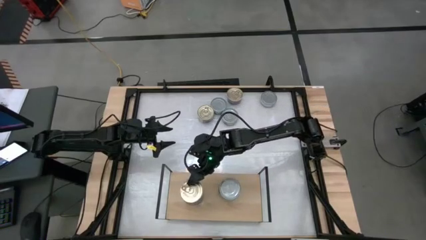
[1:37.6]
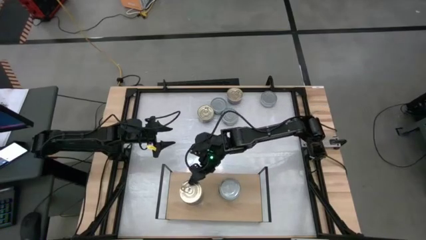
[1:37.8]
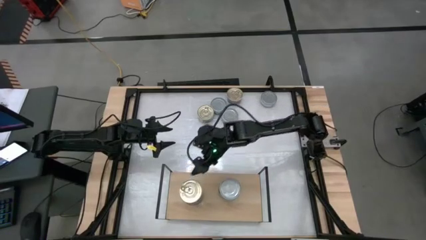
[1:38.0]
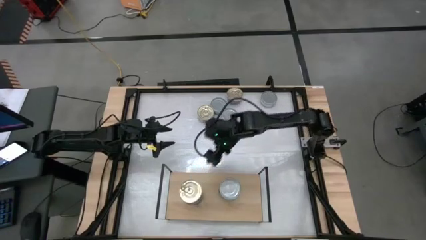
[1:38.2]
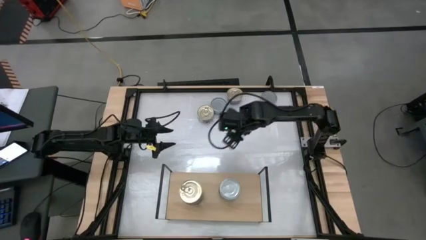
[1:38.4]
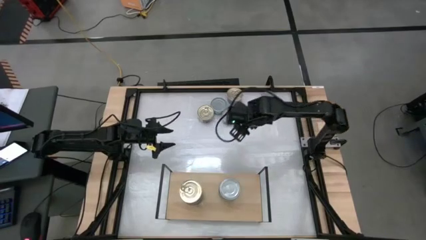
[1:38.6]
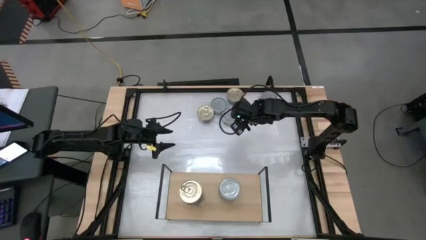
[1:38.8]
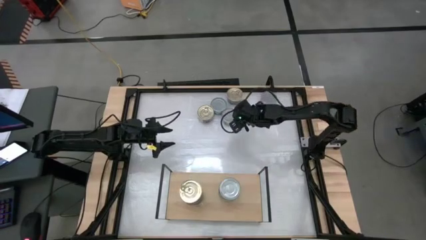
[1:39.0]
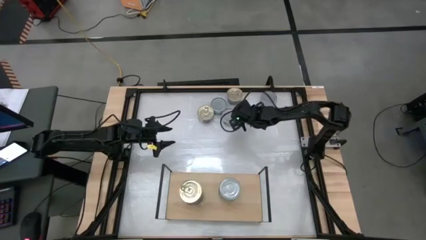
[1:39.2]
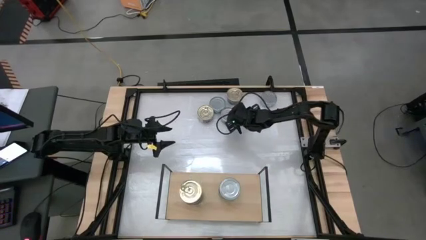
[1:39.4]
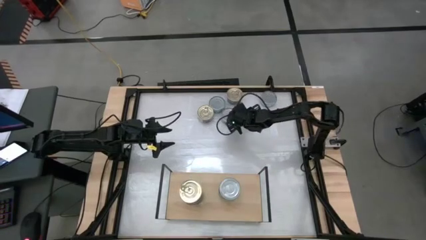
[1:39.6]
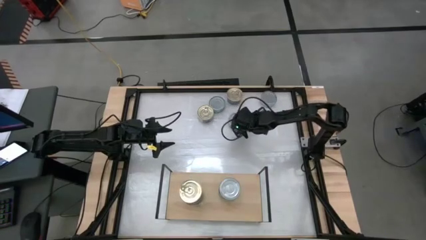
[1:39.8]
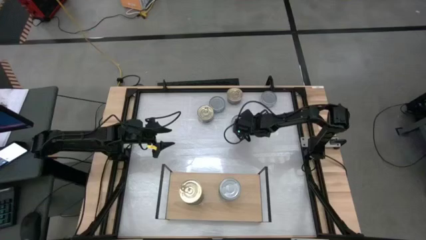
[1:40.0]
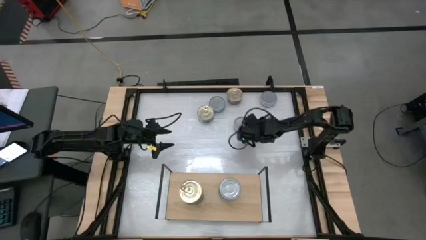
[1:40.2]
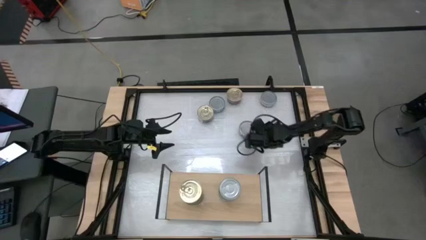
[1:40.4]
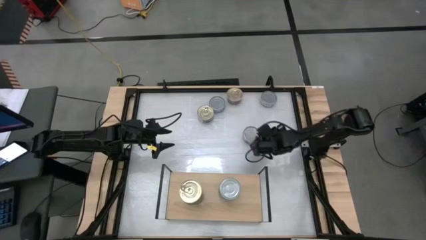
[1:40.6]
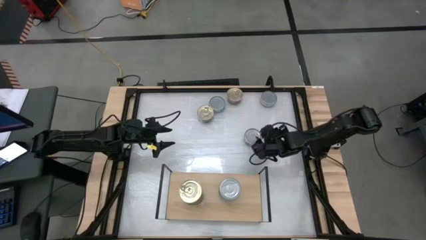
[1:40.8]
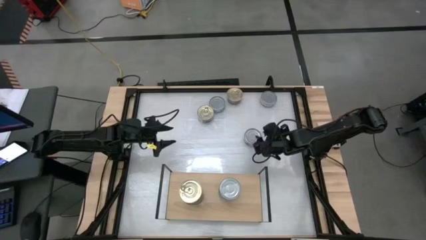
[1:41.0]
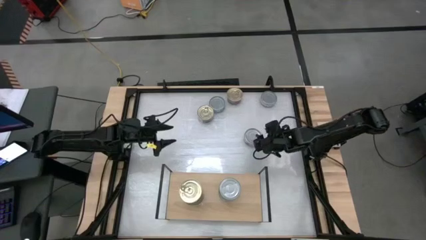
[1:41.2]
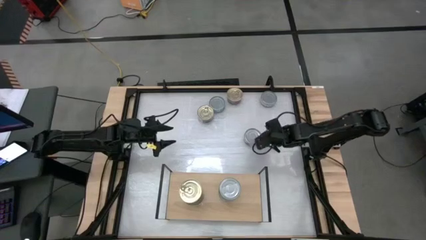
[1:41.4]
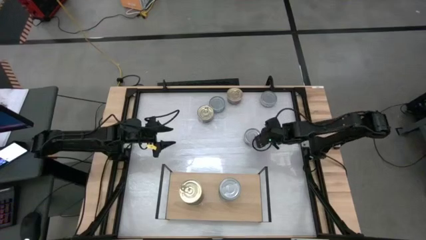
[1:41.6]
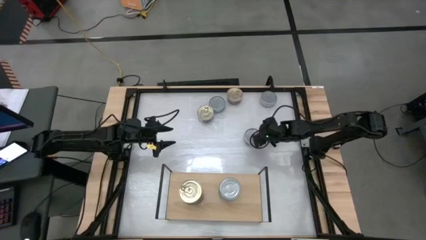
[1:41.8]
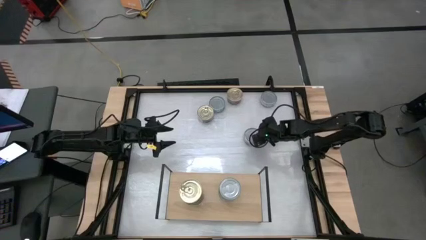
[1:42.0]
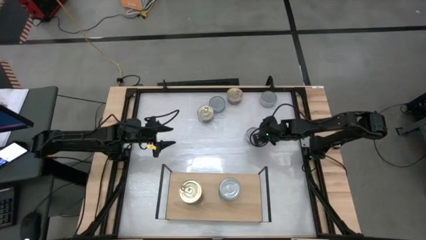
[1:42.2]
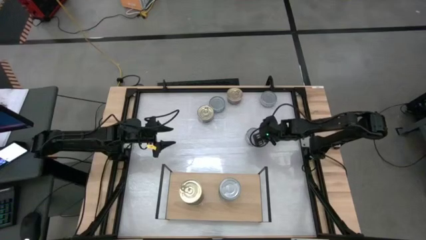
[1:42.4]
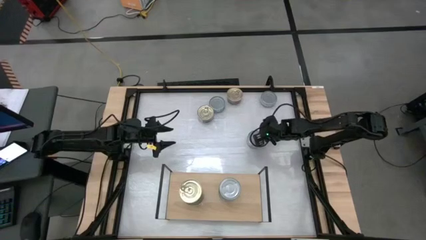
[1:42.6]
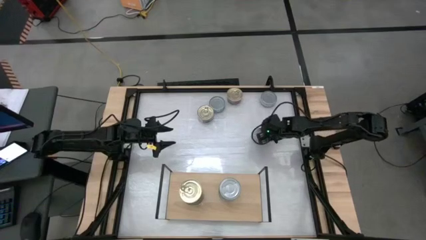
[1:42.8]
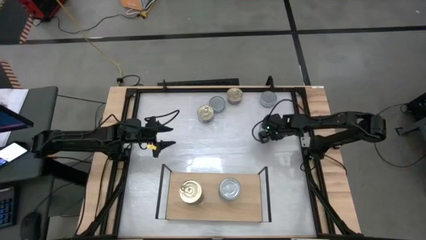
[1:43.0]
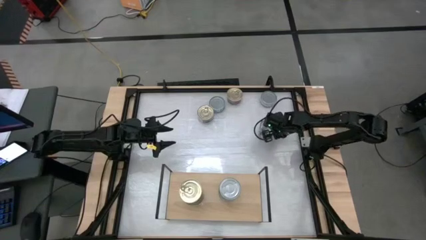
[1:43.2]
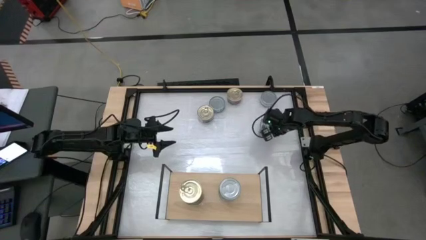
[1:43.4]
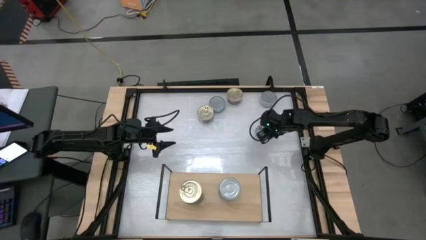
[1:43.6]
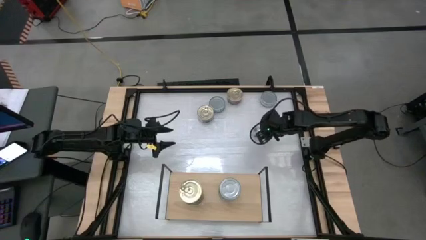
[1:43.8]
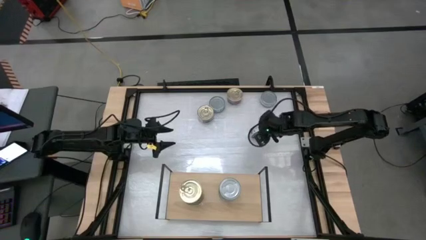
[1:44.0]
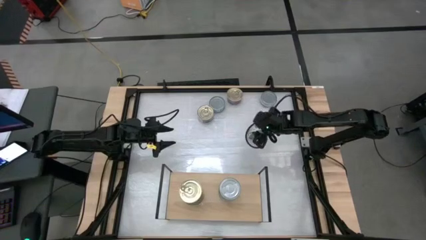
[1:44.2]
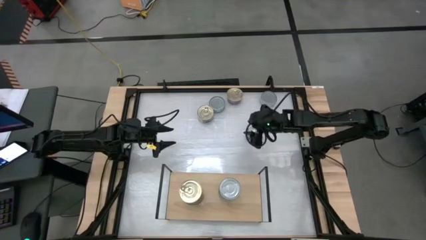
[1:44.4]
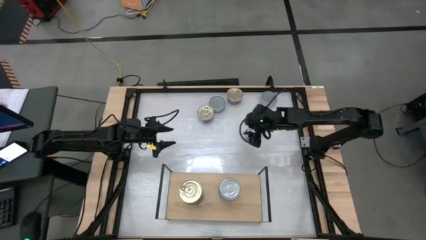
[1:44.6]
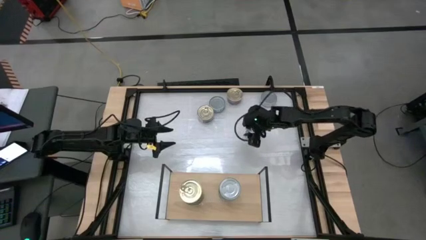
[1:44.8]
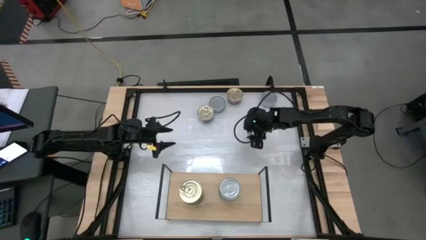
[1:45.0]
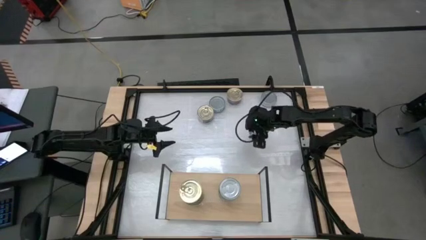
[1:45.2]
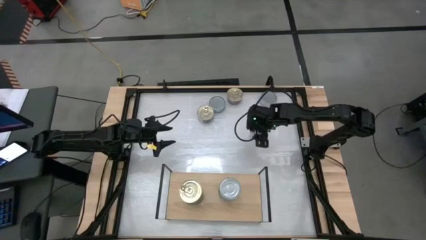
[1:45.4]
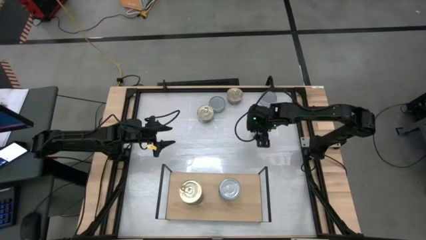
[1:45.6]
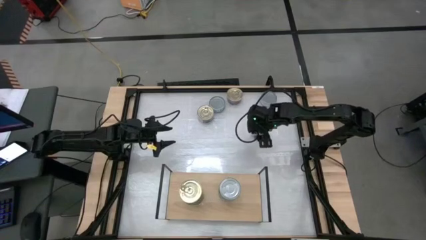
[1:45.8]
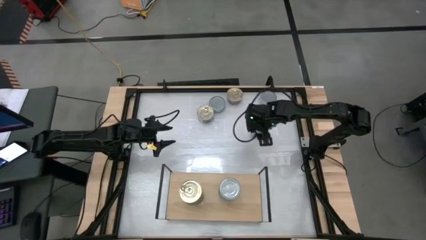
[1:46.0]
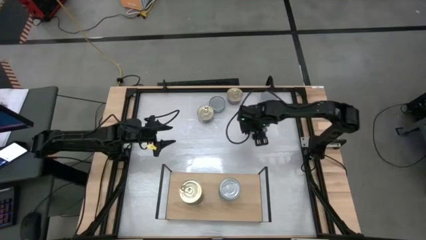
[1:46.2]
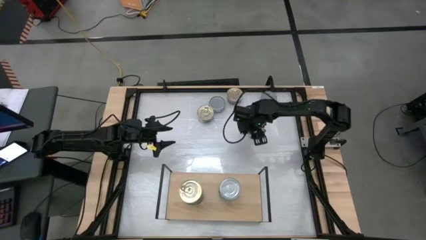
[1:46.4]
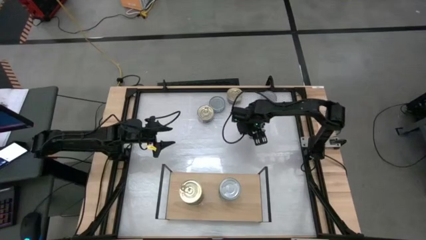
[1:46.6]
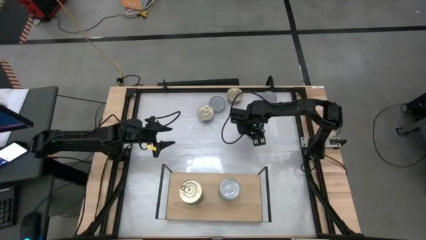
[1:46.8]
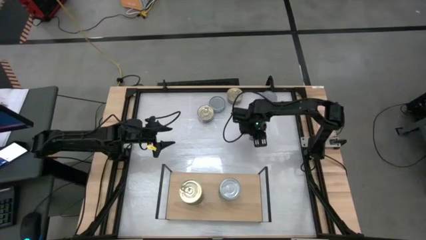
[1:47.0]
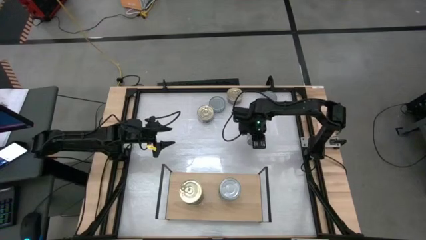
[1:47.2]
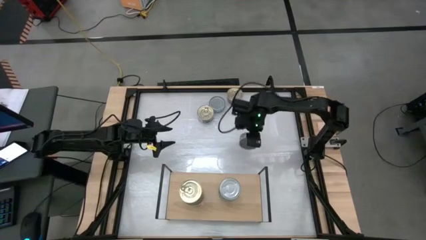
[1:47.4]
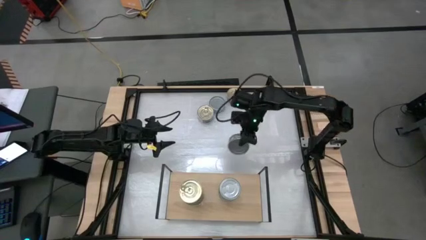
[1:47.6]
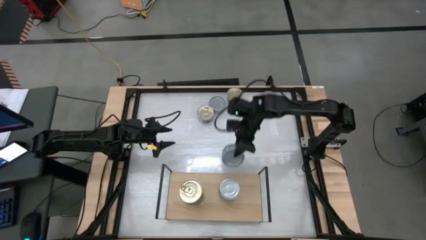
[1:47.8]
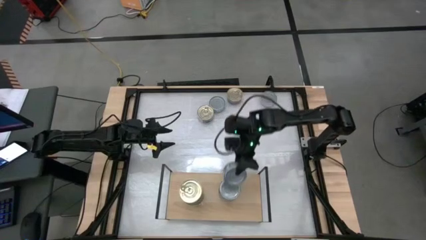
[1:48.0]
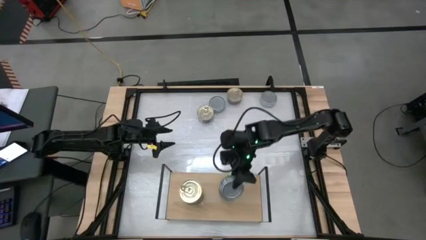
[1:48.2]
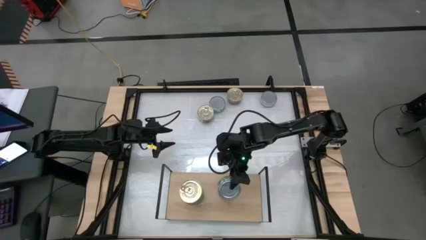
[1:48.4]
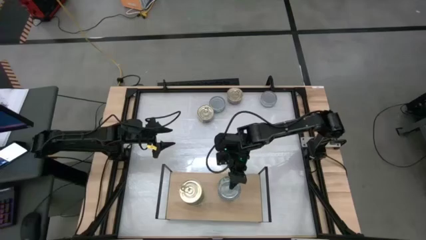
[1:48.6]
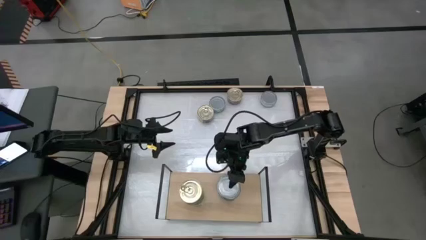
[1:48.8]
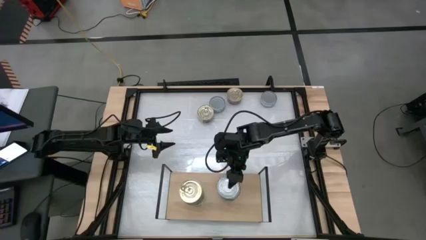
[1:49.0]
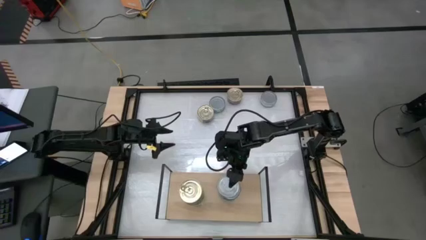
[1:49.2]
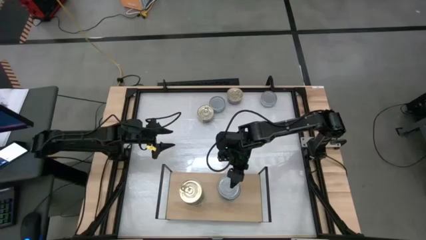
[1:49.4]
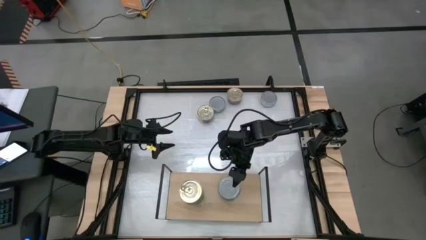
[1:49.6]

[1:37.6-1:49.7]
Task: Stack canned seafood by type on shelf
Stack the green tuna can on top of the green tuna can on the shelf

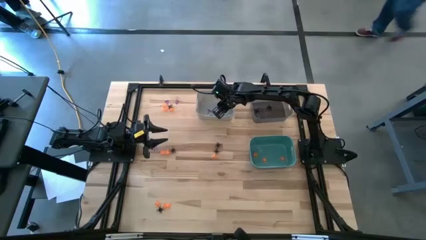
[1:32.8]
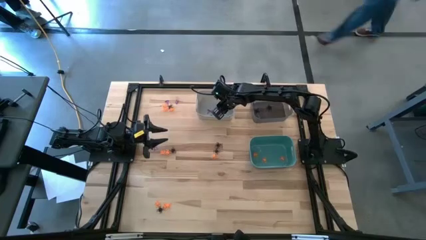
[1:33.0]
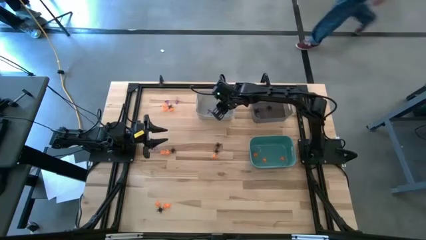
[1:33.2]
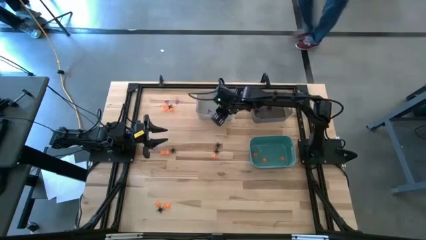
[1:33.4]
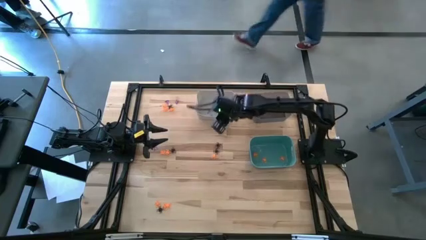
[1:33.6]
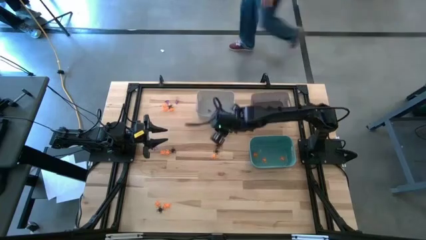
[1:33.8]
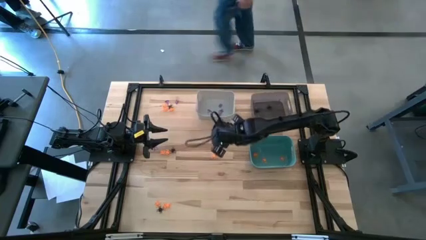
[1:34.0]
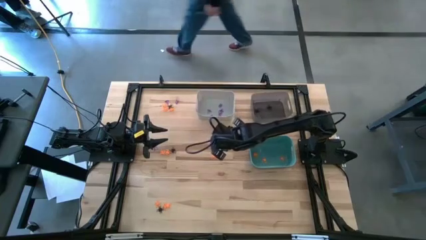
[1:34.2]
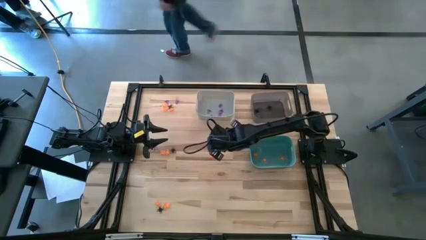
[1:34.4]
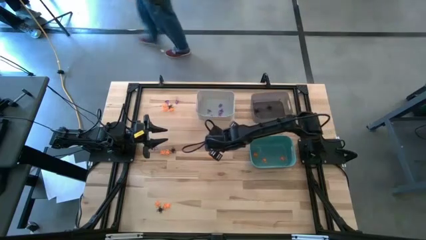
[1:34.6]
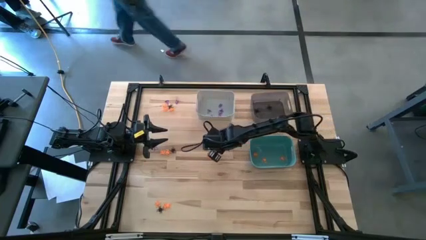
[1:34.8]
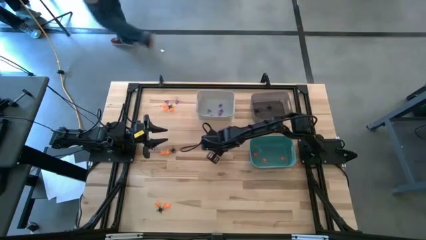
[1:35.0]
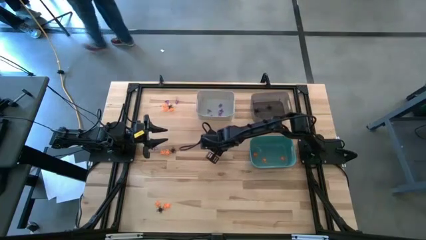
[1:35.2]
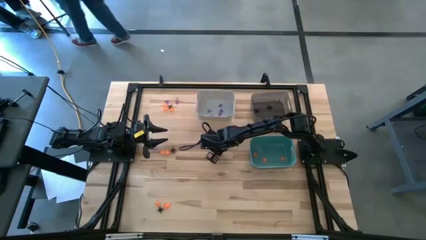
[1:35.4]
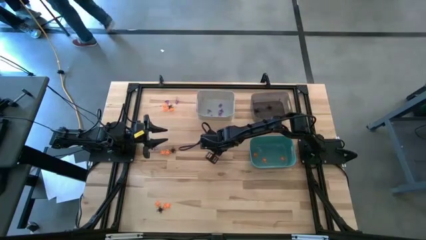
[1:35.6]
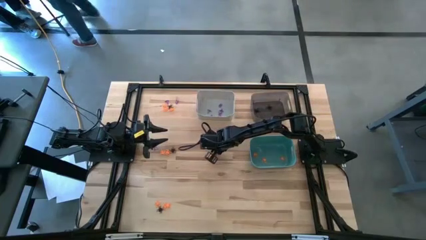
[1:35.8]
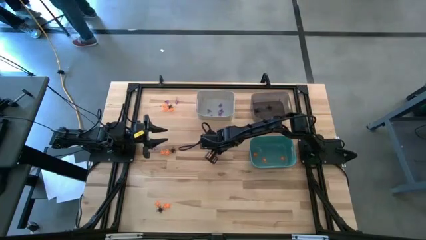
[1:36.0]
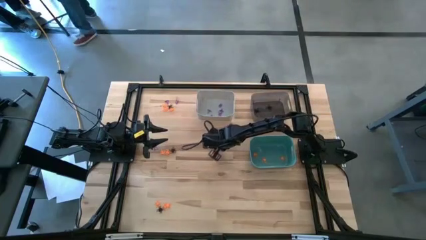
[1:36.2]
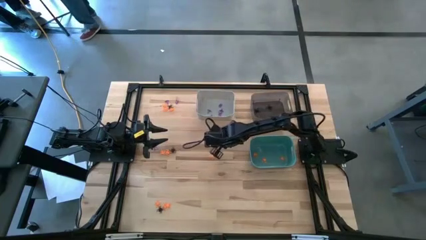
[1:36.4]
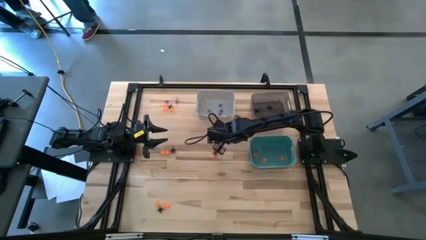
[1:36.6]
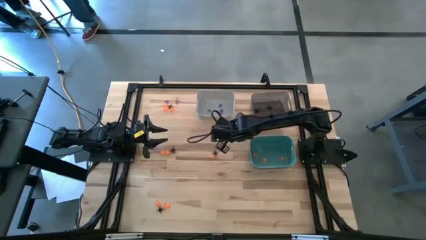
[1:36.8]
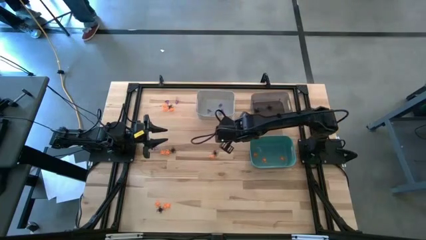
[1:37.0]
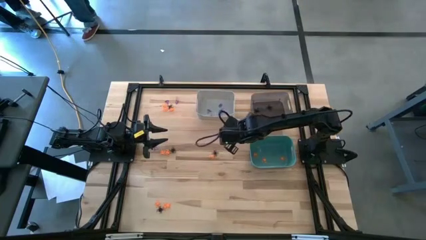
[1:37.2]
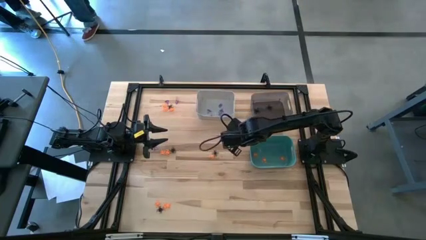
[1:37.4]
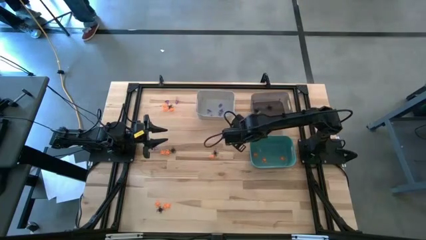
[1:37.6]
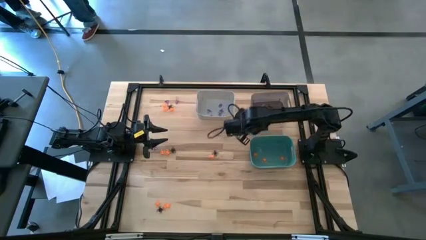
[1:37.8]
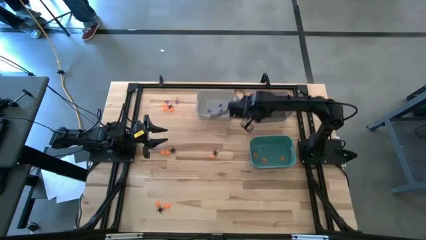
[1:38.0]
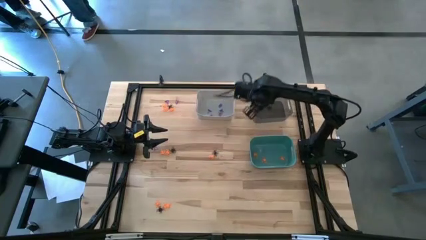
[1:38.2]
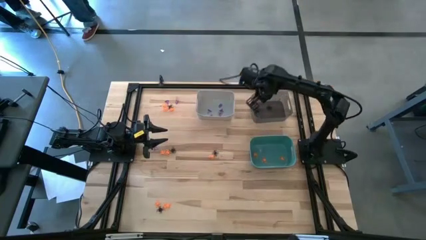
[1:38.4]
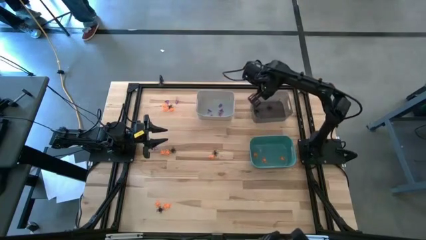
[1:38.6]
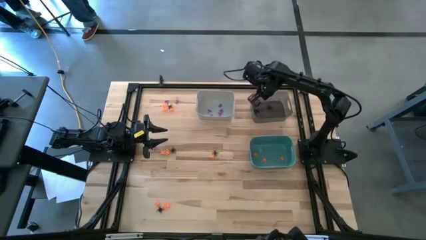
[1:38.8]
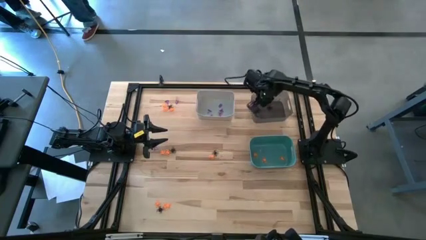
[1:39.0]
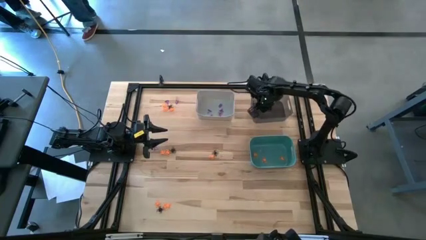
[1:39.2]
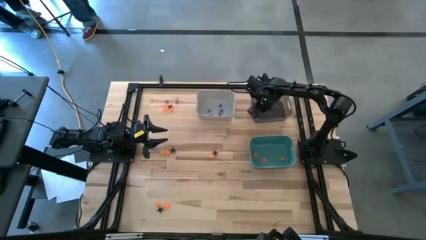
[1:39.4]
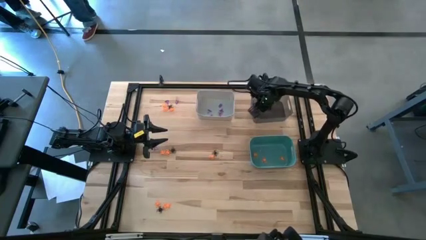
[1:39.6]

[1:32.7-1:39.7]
Task: Sort Halloween decoration
Put the black spider toy into the black bin
